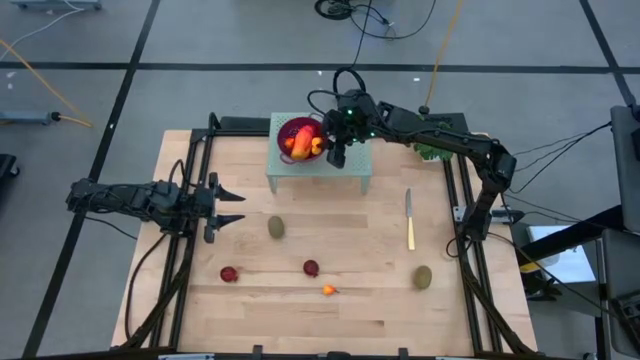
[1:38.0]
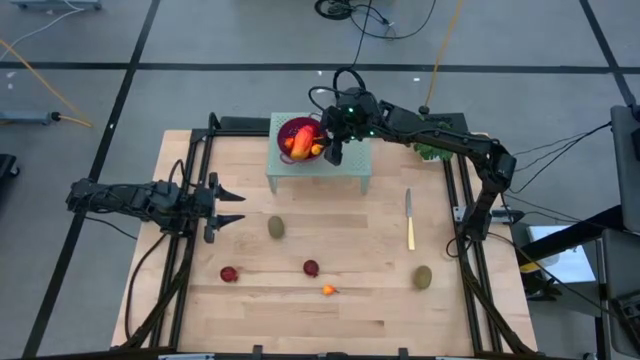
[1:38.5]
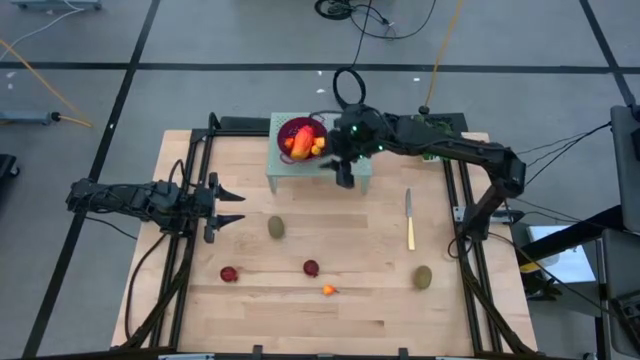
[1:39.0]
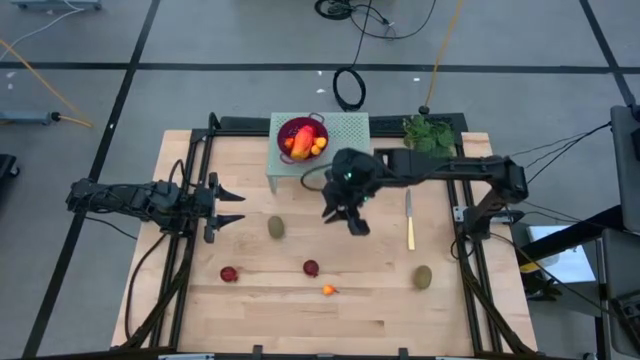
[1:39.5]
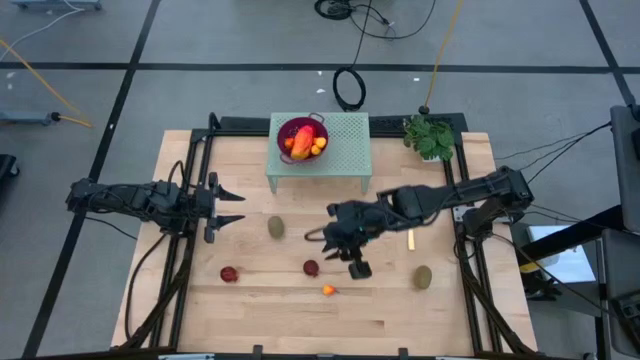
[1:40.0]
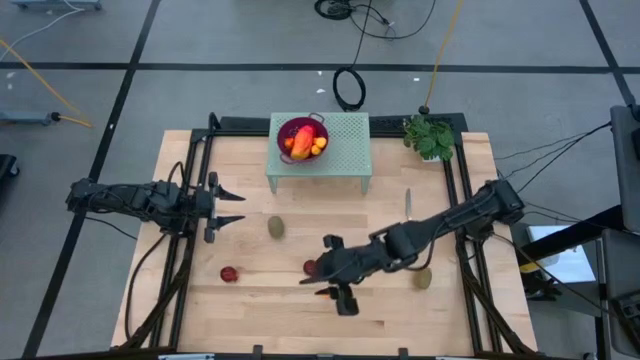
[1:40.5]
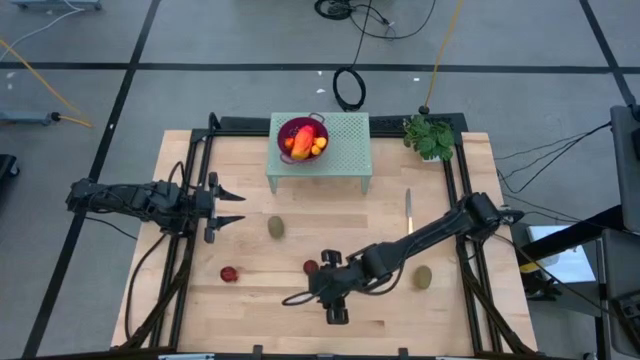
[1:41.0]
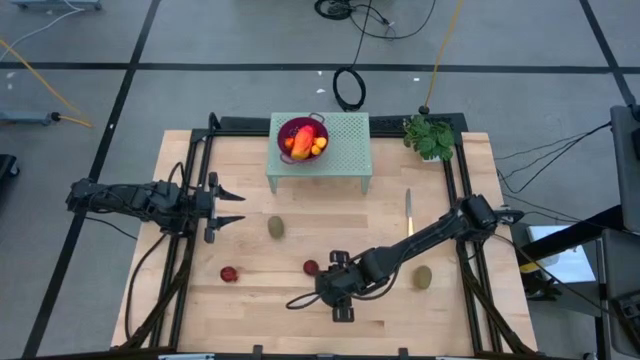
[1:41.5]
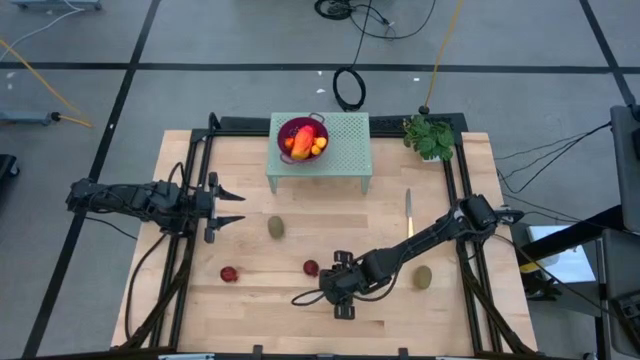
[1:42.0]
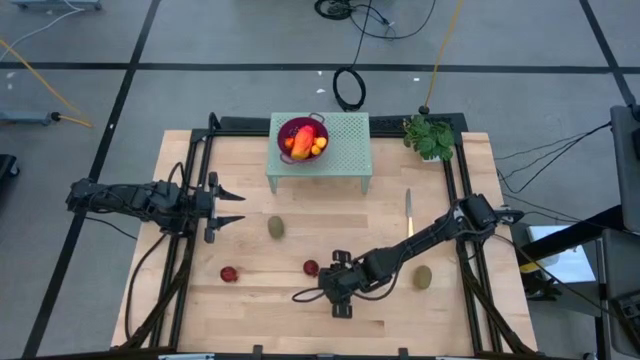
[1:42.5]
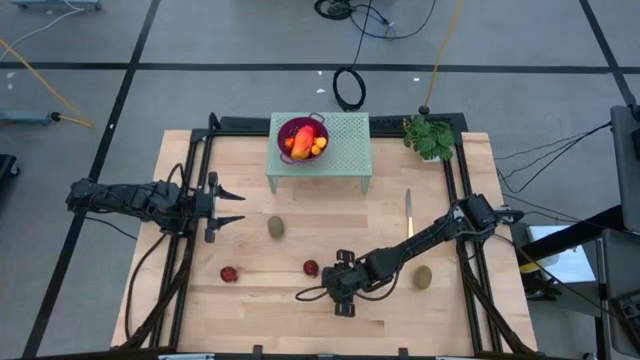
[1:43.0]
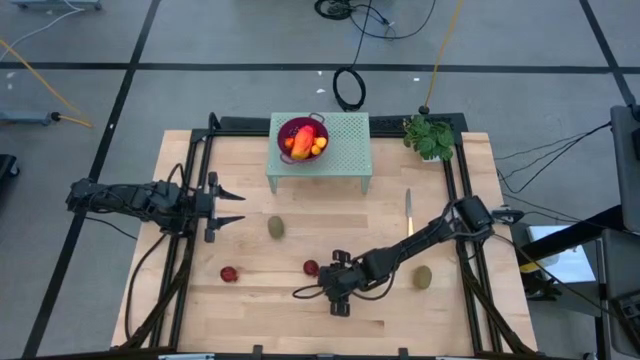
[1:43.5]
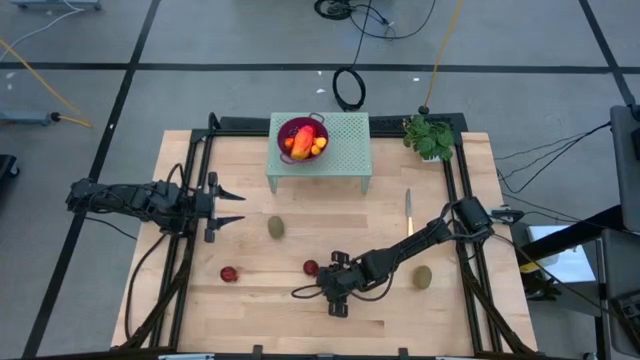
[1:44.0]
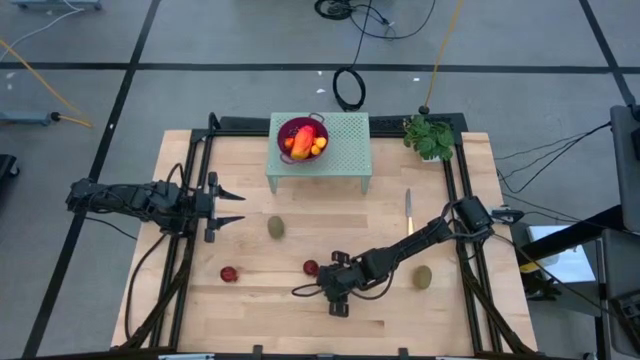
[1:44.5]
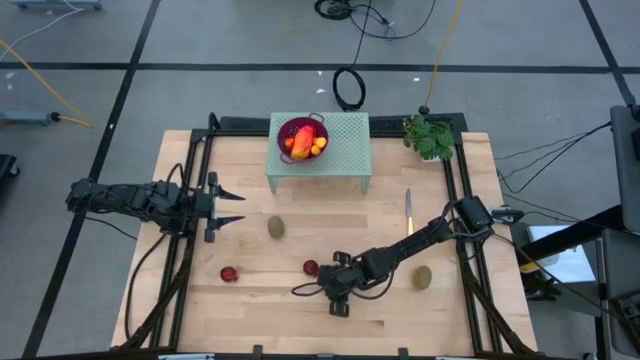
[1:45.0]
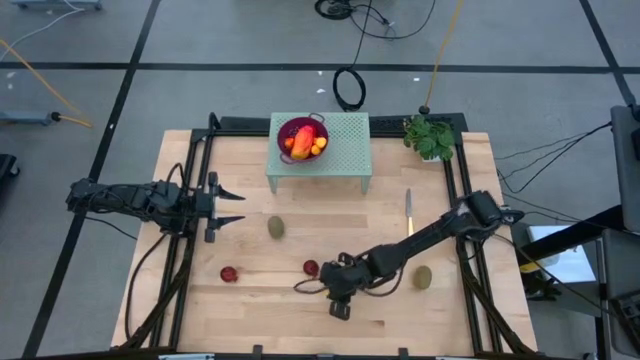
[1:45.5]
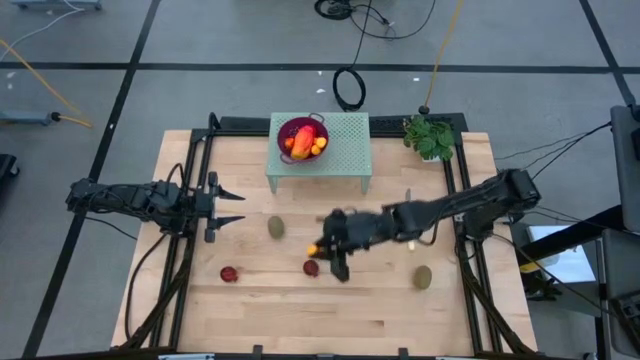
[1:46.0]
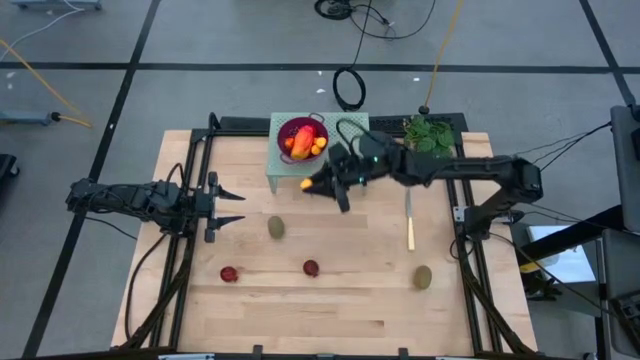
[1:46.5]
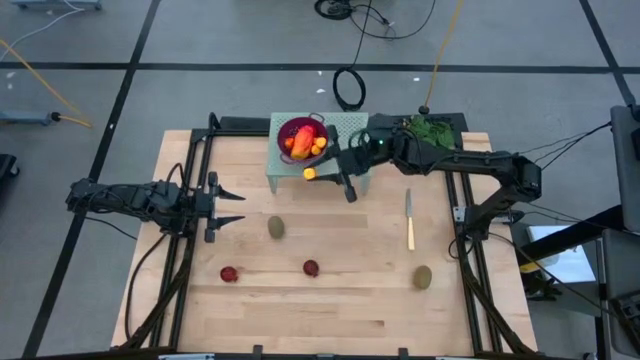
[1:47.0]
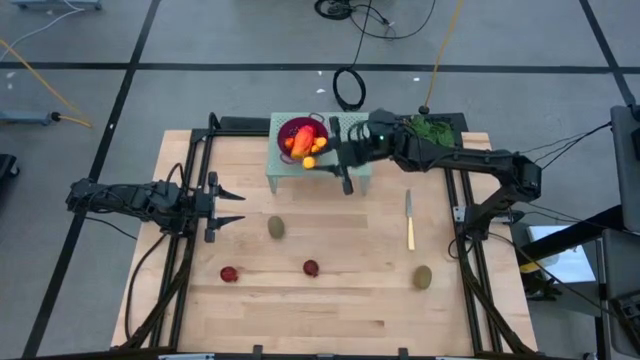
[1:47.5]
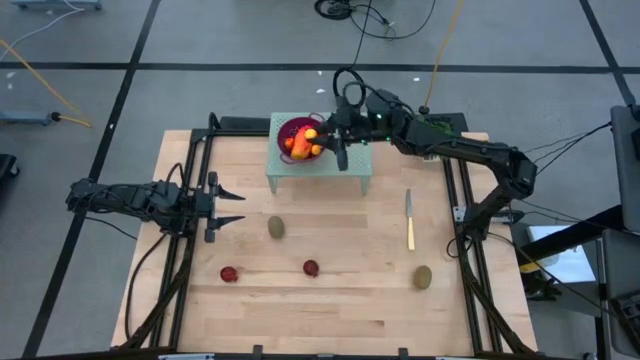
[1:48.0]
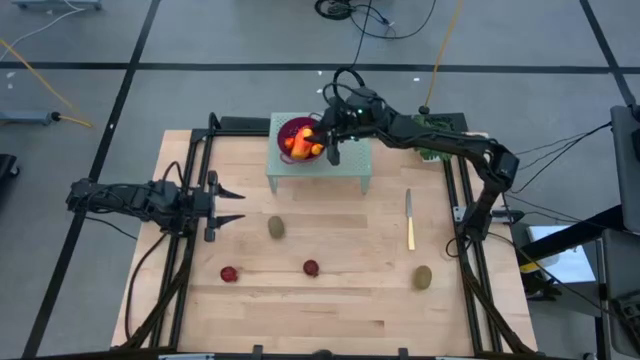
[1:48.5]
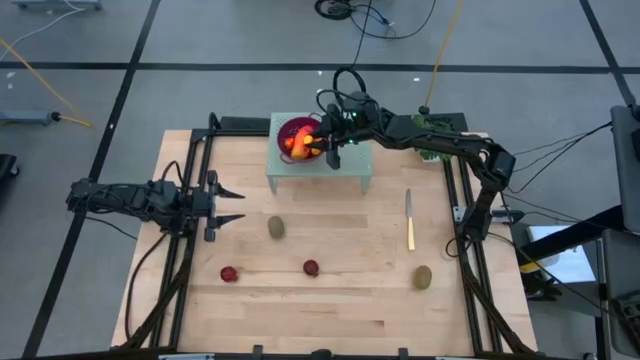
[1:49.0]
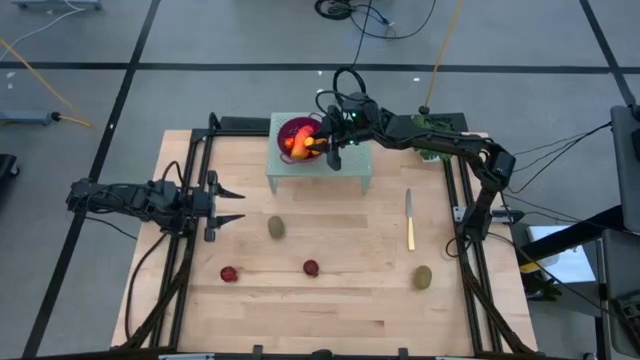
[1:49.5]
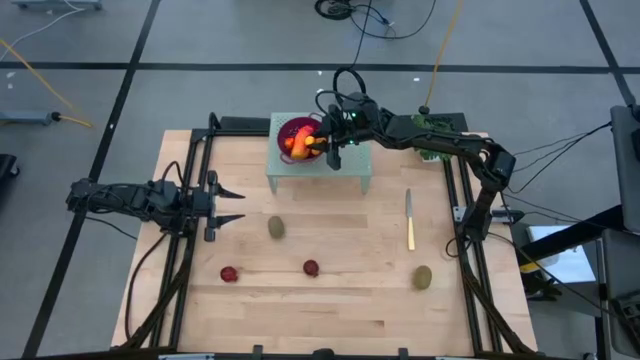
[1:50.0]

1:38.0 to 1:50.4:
Task: Pick & Place Fruit
Put the pear into the violet strainer bowl on the shelf

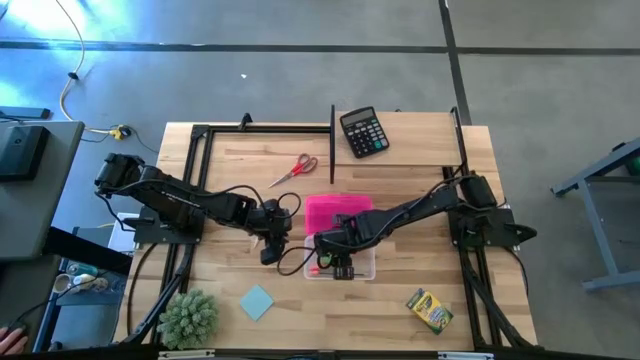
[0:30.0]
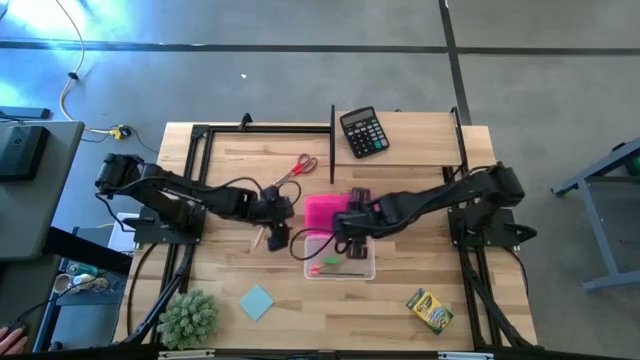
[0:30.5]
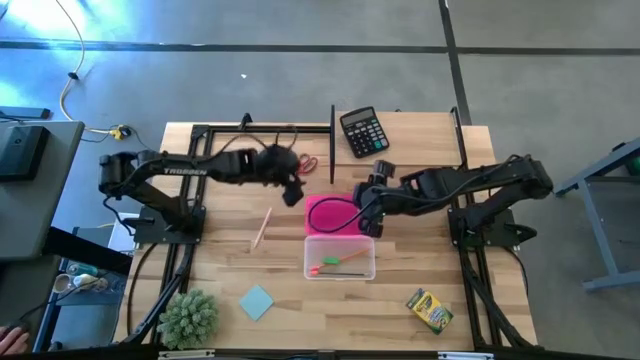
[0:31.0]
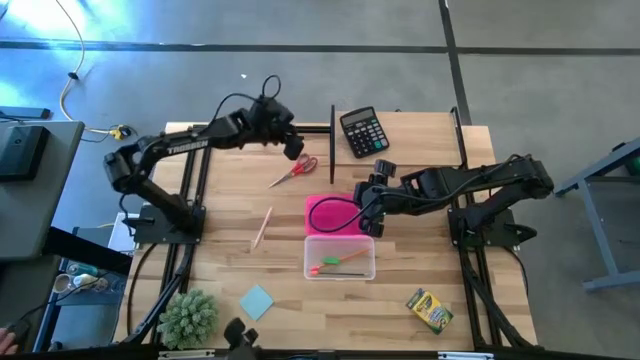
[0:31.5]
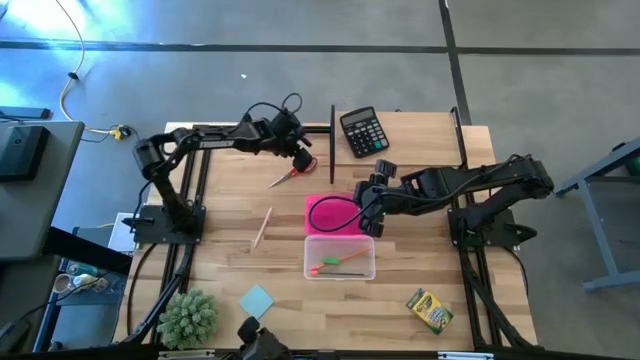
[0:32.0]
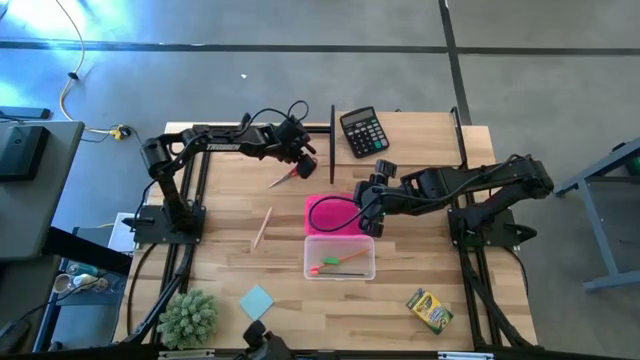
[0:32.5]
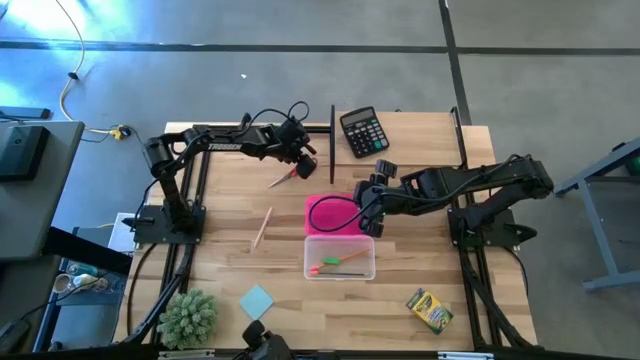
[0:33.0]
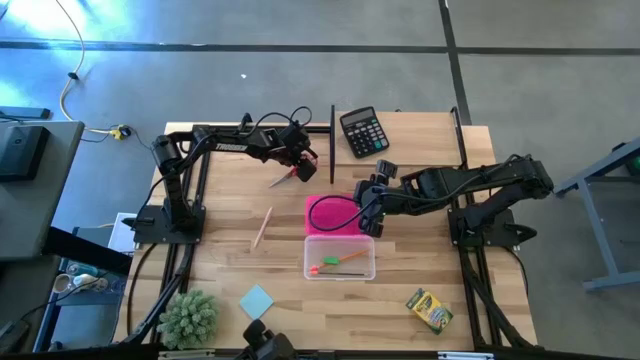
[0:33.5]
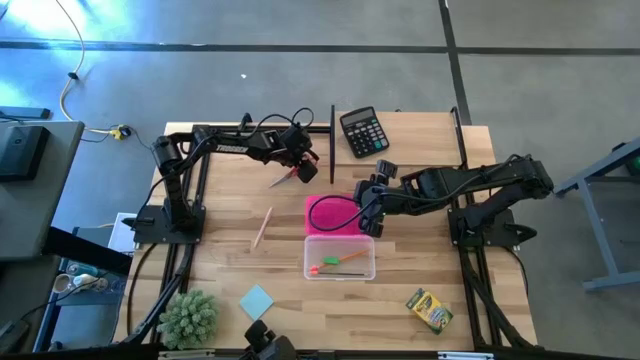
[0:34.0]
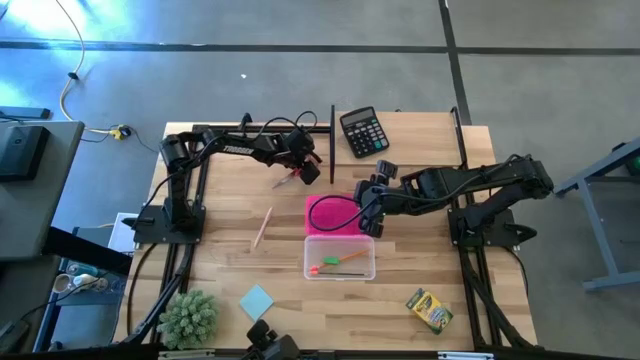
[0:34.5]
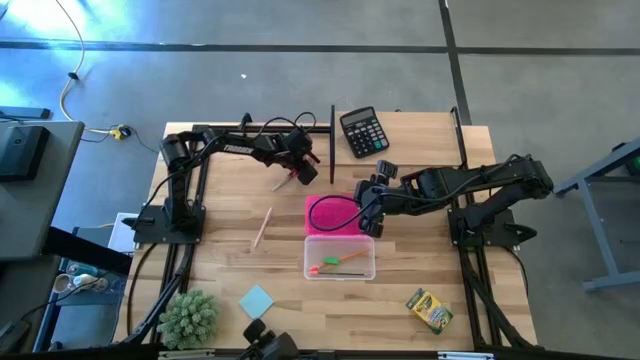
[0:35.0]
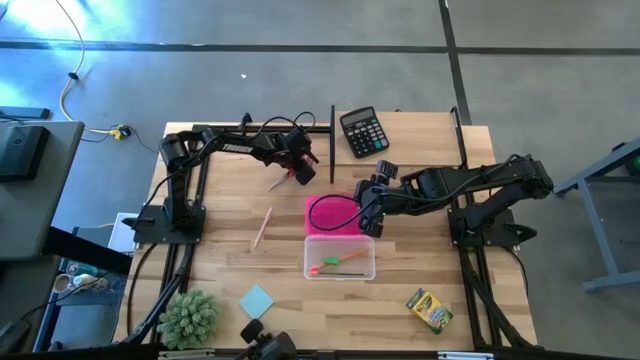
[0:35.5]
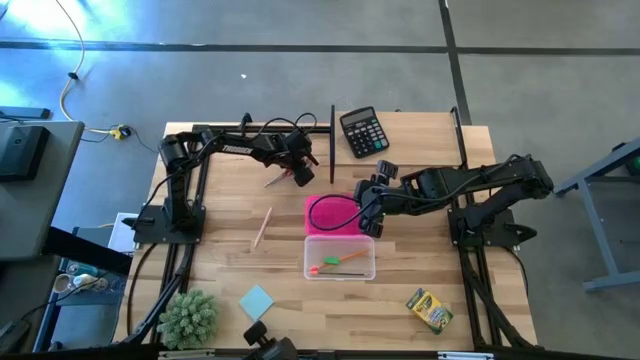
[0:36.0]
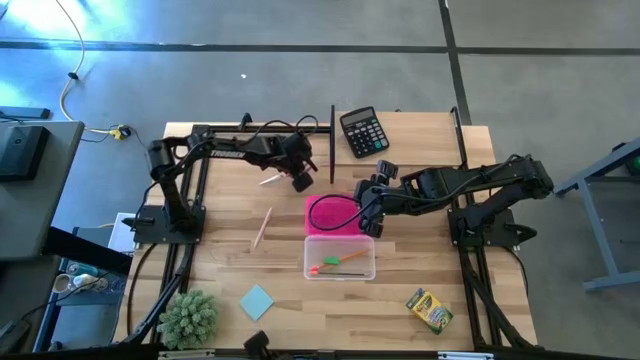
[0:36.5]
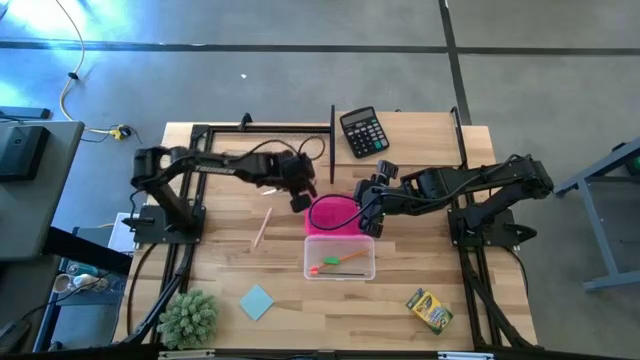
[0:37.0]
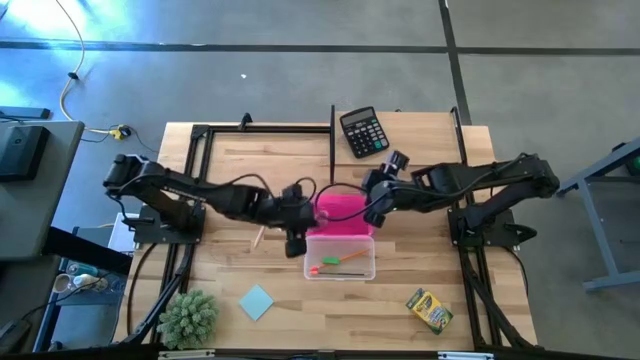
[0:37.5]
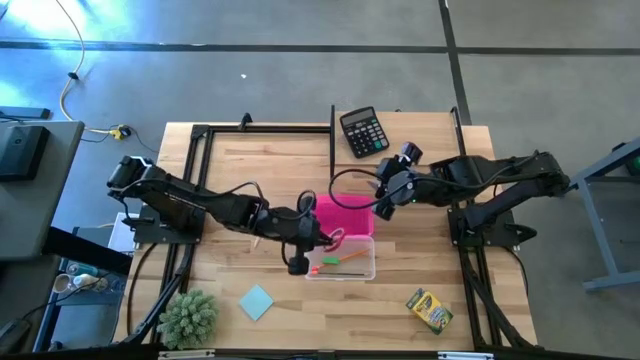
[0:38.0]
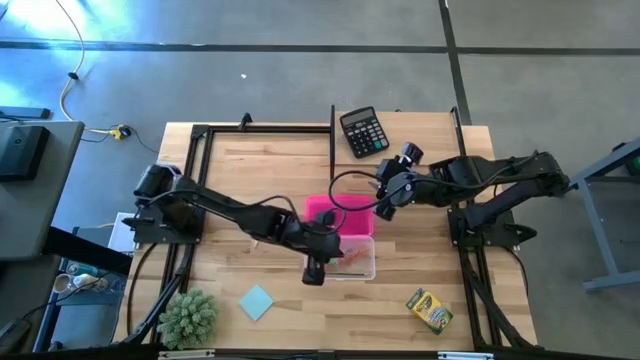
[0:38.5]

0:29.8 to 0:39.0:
Task: Pack school essentials
Put the red scissors into the supply box

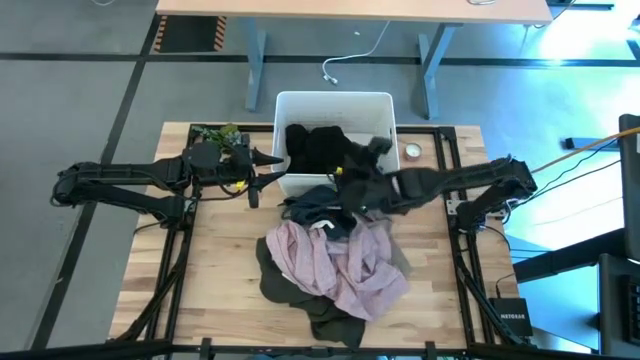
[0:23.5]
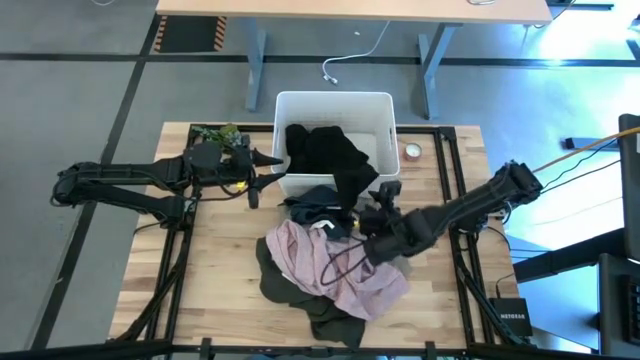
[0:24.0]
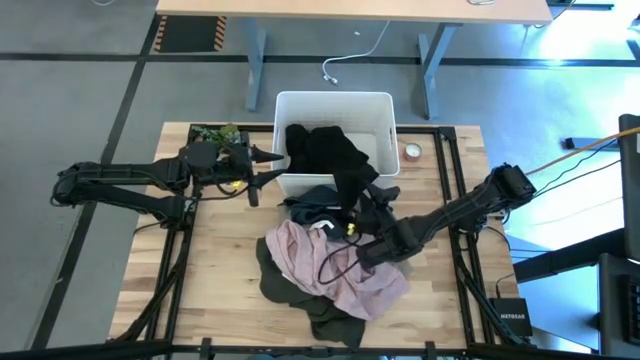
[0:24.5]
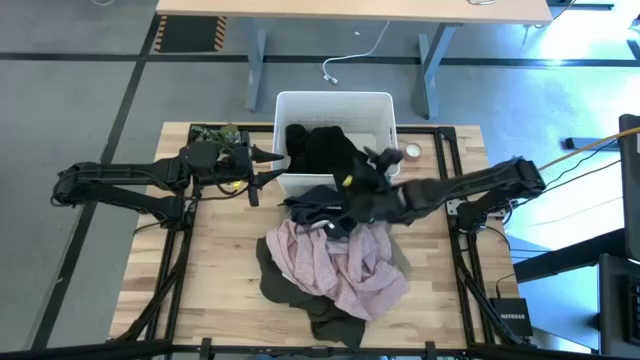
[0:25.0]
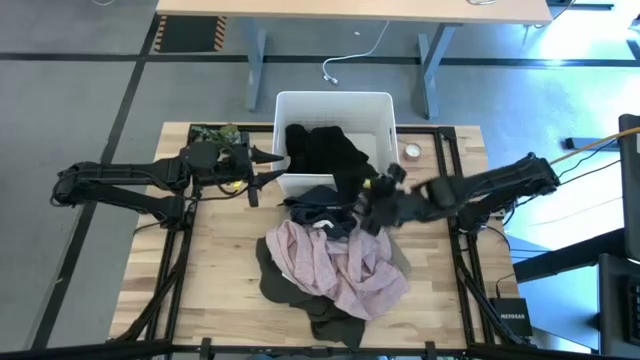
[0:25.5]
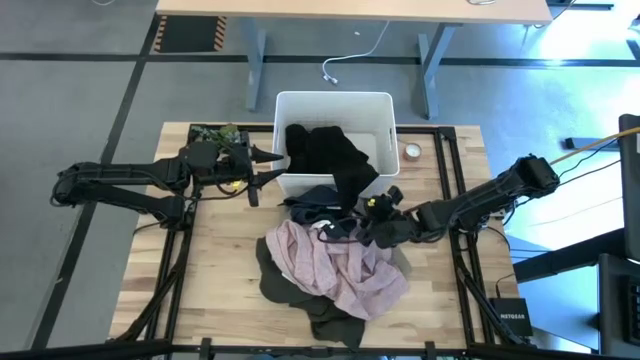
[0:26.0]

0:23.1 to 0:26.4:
Task: Sort clothes
Put the black shirt into the white laundry bin
